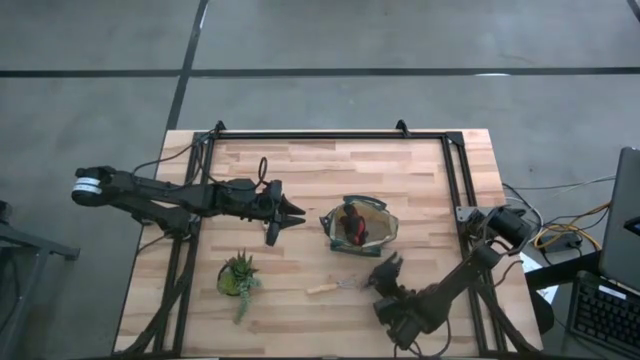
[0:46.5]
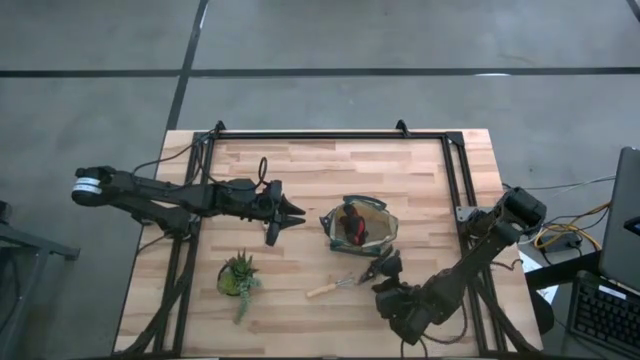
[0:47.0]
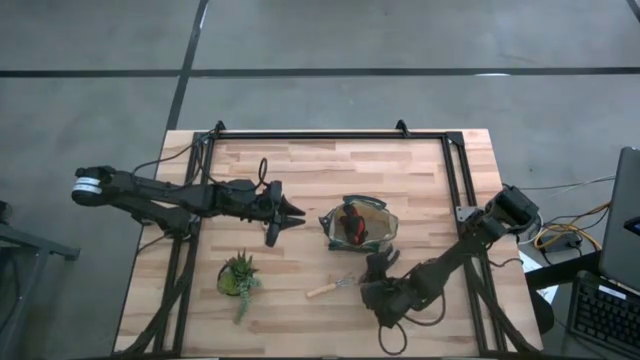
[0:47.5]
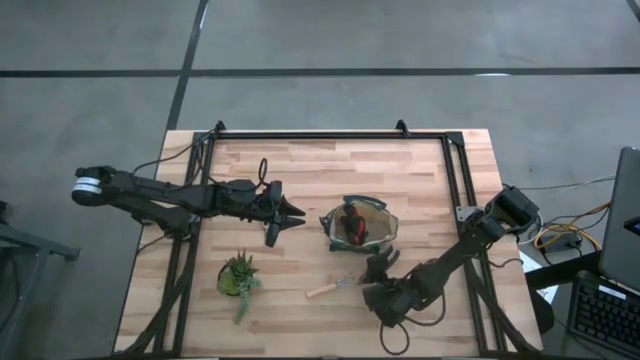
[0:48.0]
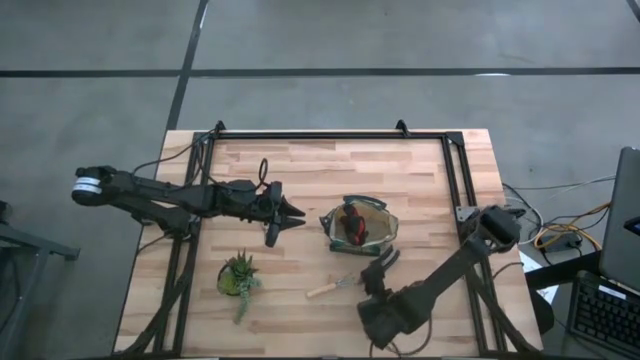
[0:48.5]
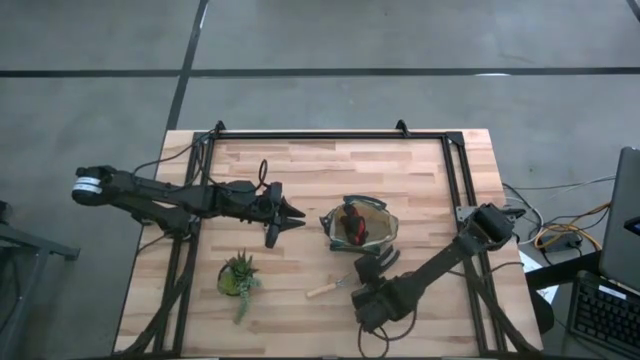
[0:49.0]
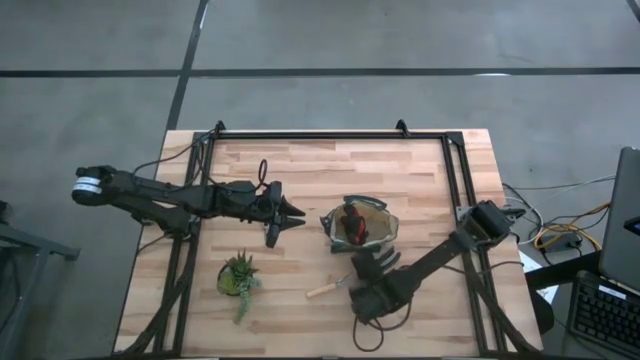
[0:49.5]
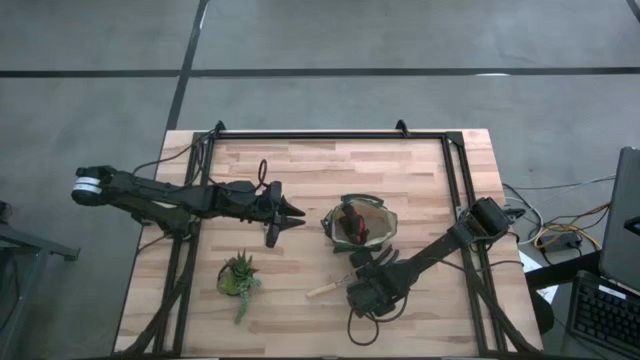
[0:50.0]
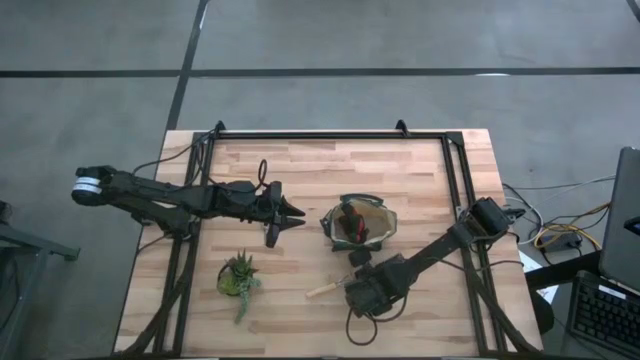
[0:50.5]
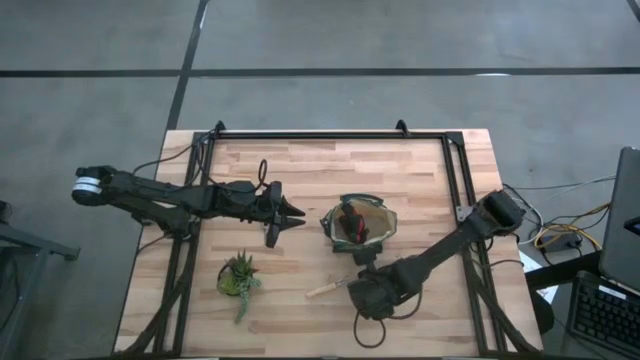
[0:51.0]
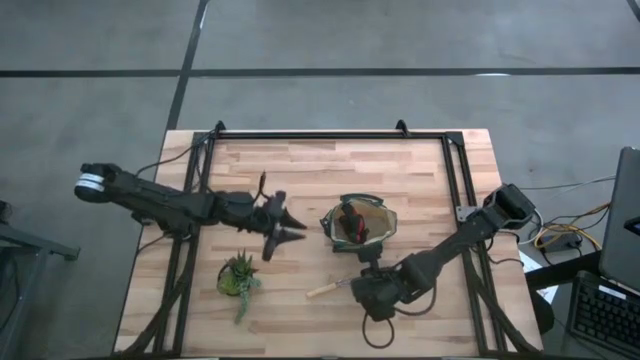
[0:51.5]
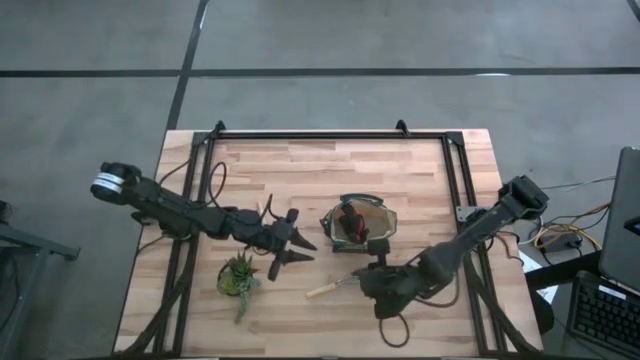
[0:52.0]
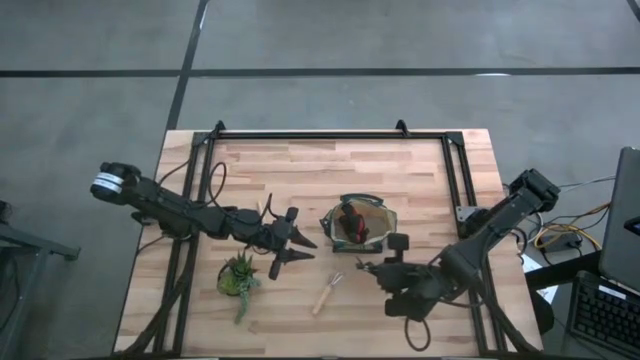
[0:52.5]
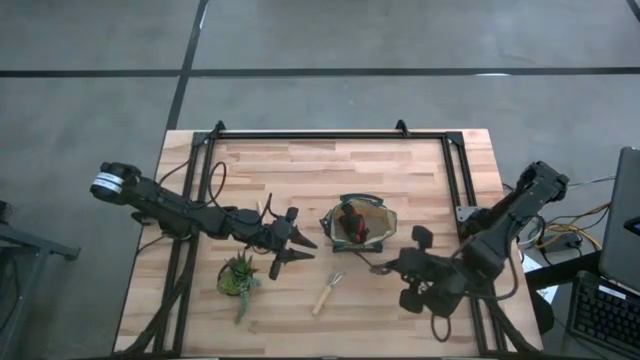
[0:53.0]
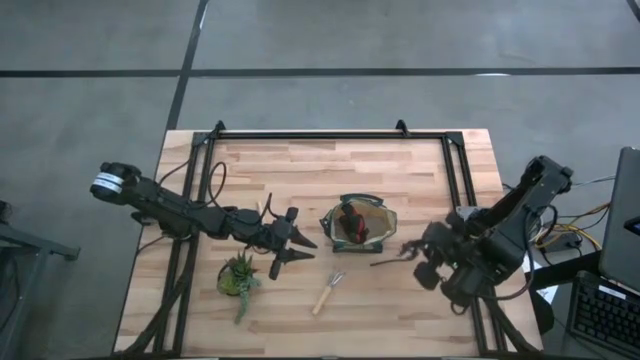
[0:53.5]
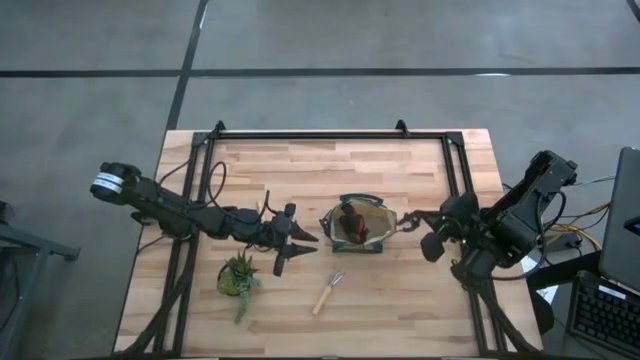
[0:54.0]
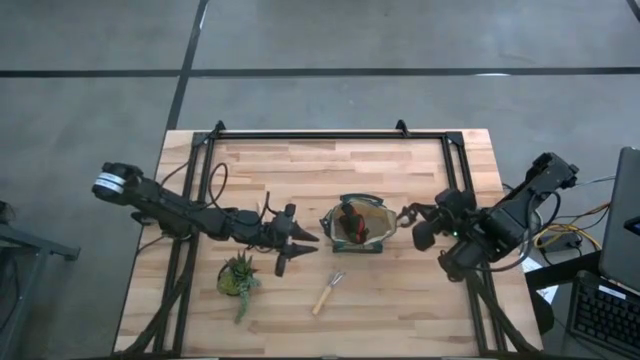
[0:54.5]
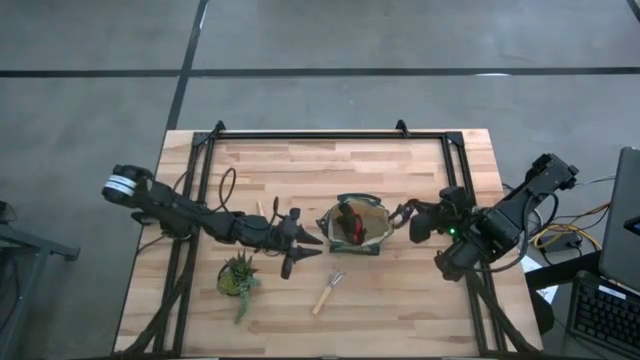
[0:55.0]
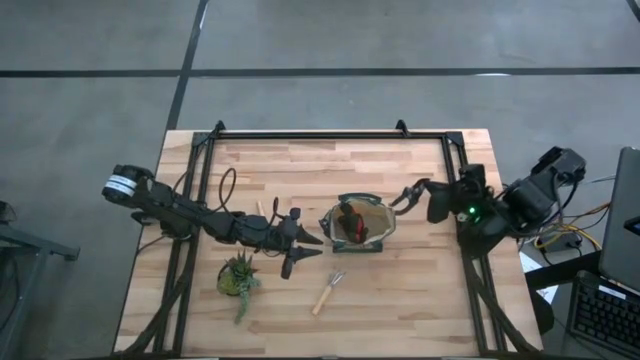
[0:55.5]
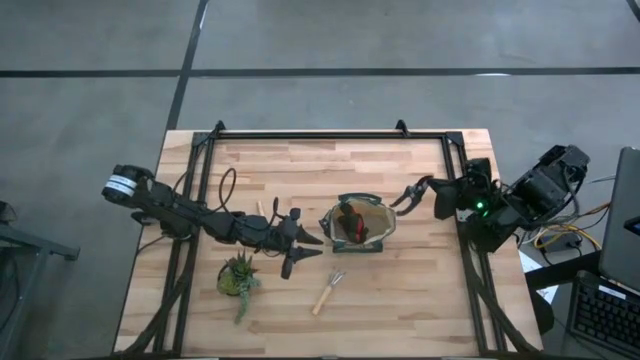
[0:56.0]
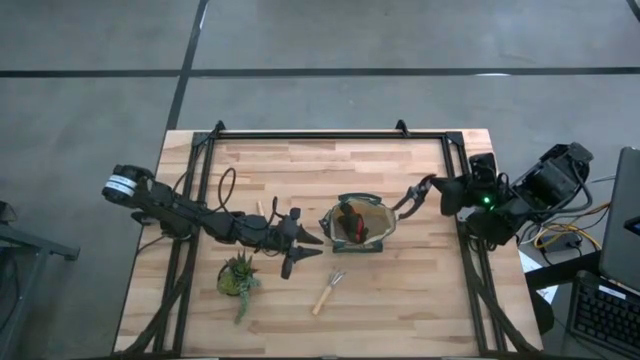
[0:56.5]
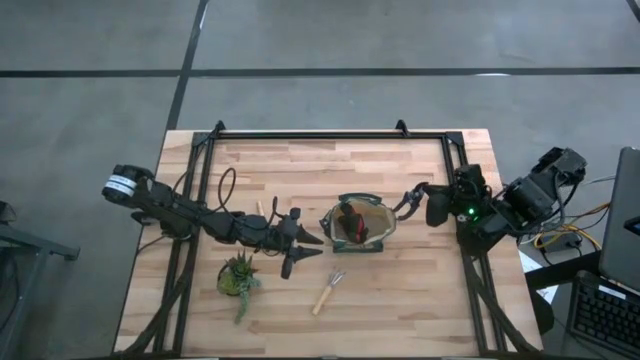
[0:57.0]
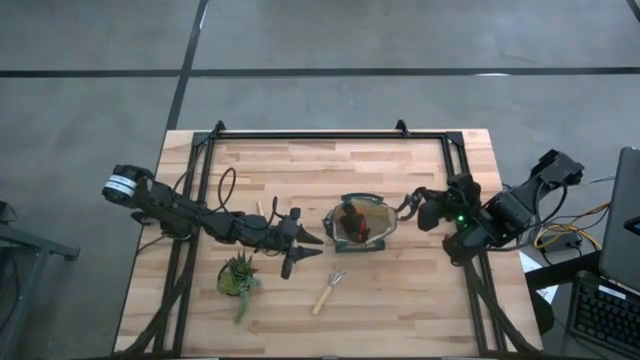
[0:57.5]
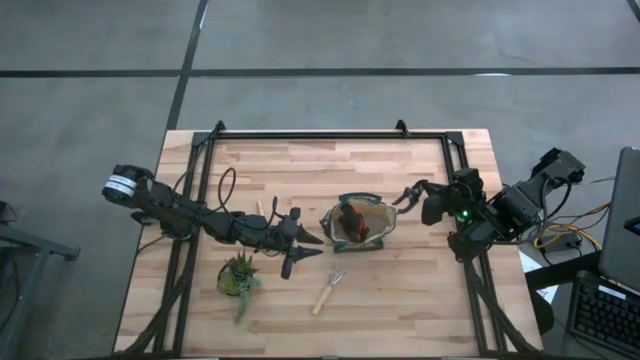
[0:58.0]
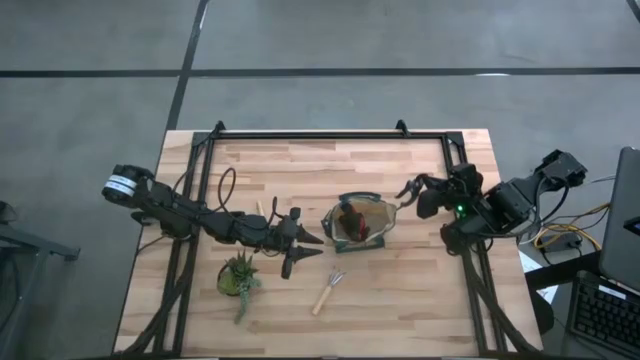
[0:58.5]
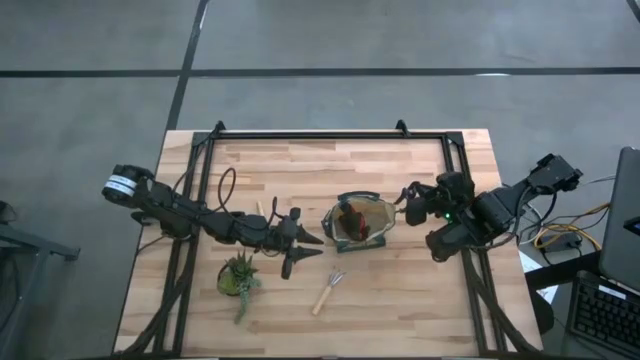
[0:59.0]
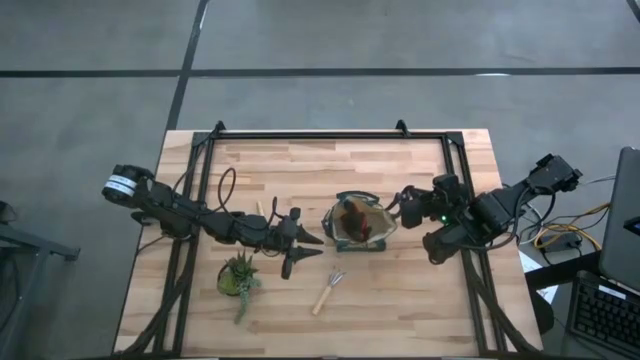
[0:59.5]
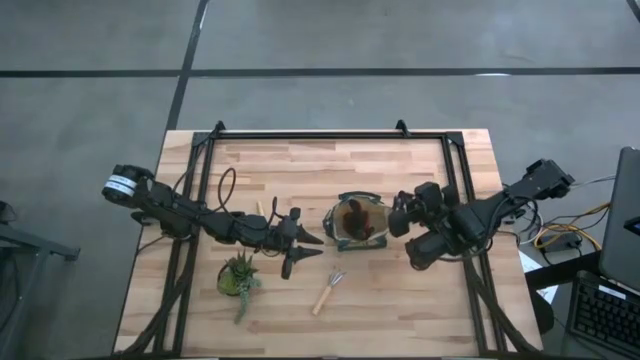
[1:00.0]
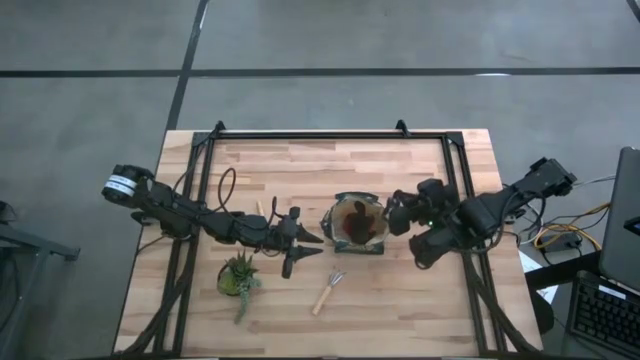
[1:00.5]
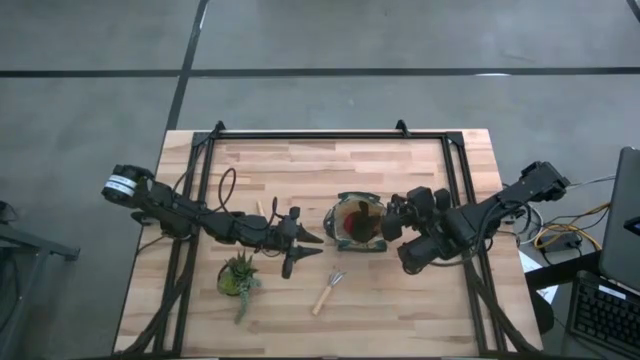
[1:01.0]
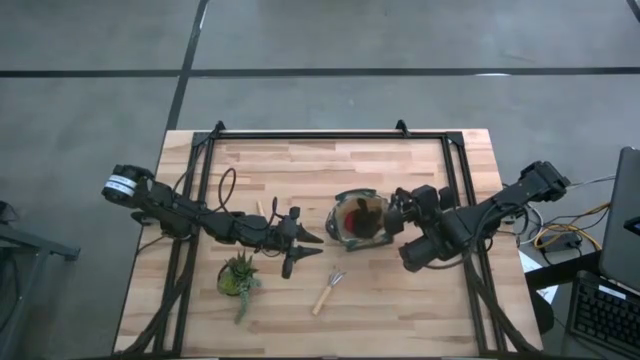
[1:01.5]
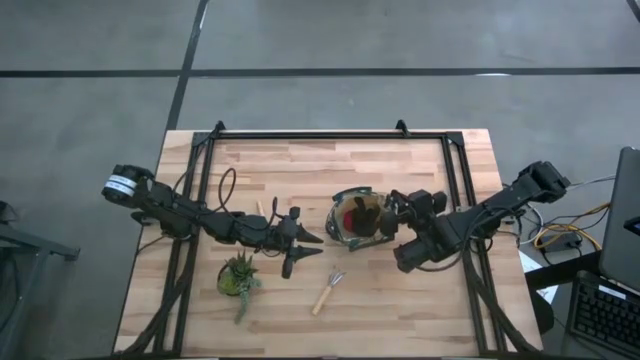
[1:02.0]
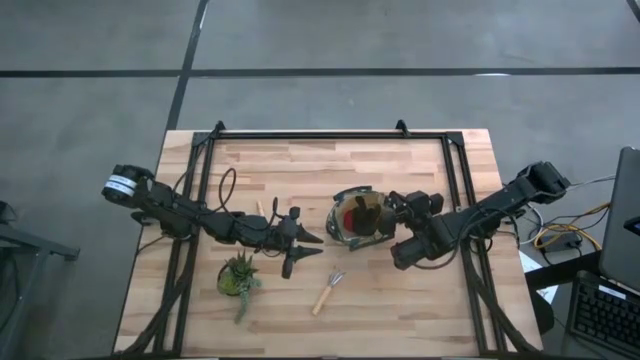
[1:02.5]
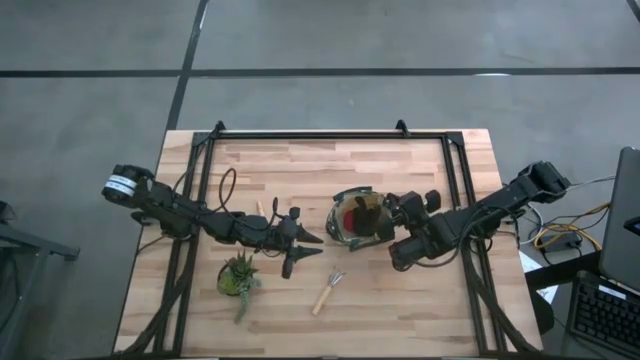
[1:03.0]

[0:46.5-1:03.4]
Task: Pick & Place Garden tools in Gardening bag
Put the green shear scissors into the green gardening bag

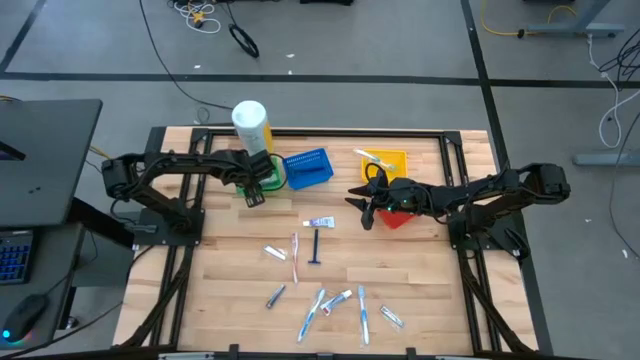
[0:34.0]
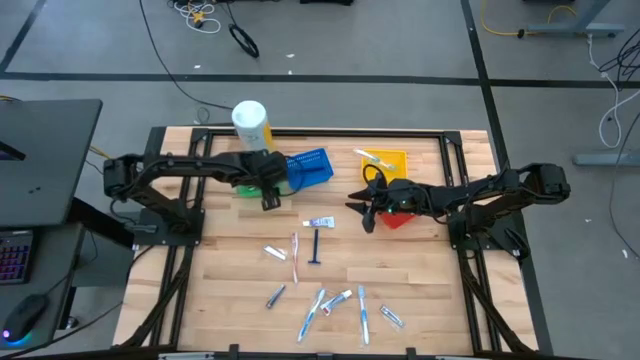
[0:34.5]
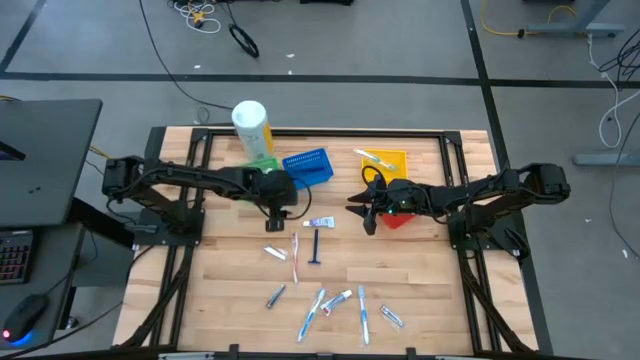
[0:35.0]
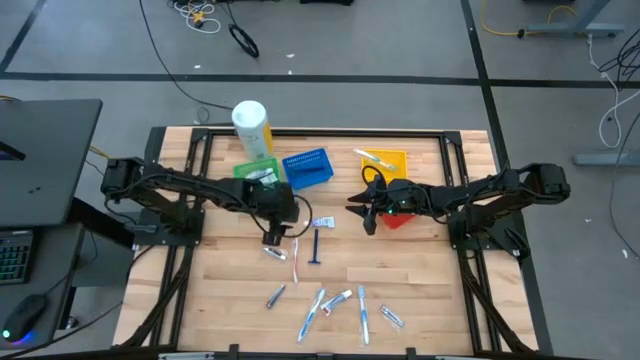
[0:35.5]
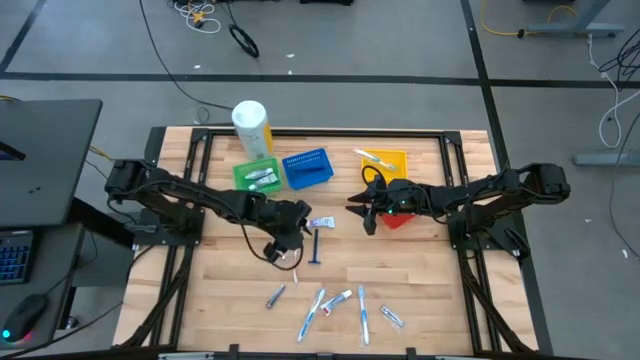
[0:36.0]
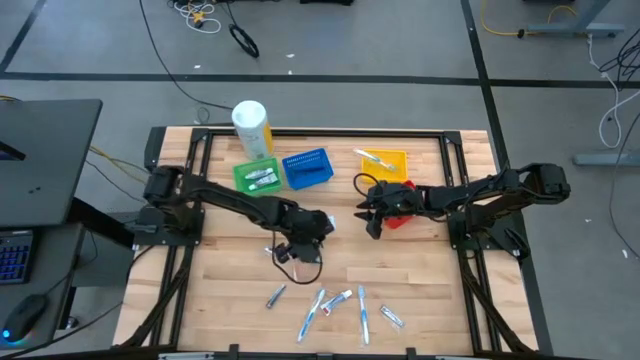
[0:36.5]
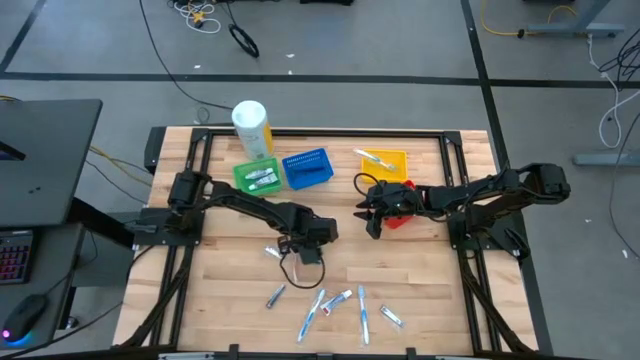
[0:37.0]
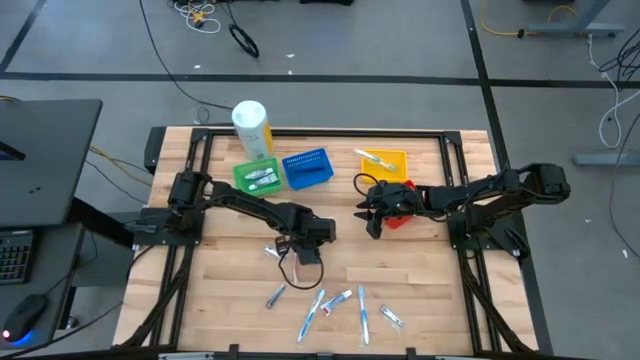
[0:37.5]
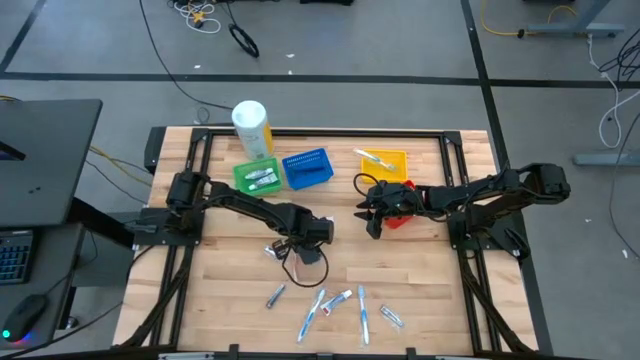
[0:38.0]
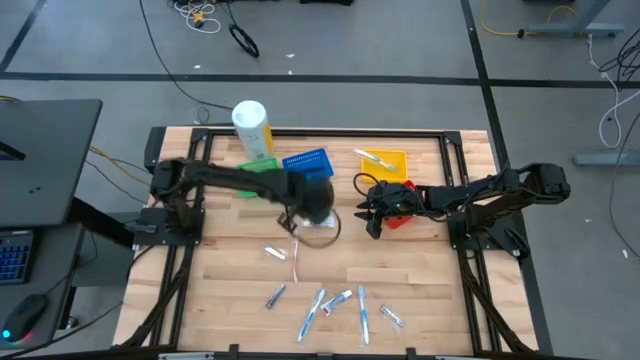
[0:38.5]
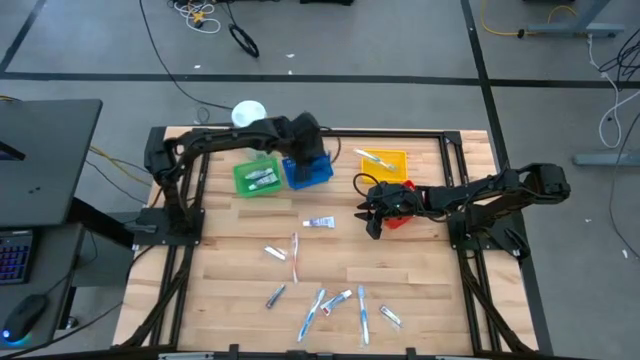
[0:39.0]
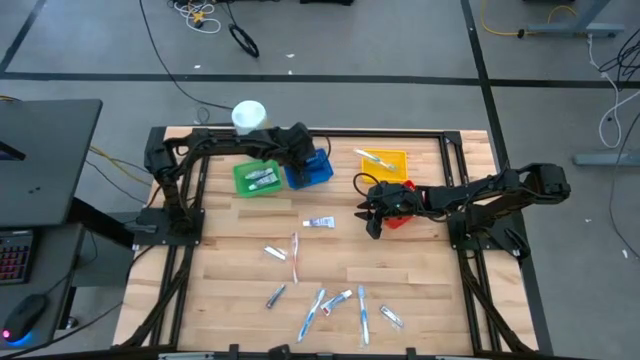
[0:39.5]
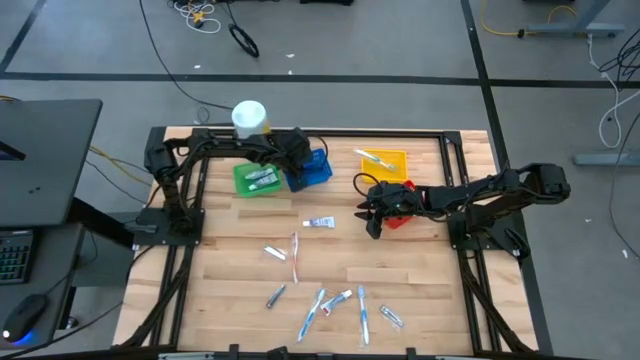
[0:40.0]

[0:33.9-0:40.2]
Task: Pick & Place Travel size toiletries
Put the left blue razor into the blue bin
